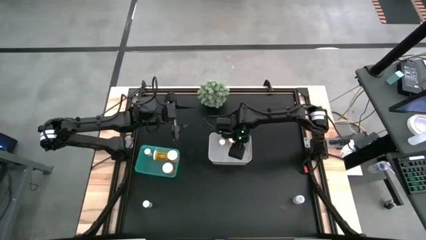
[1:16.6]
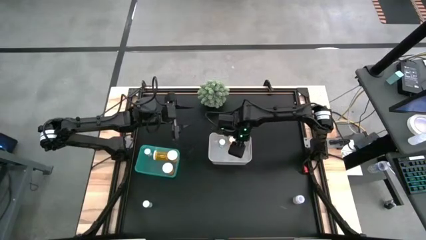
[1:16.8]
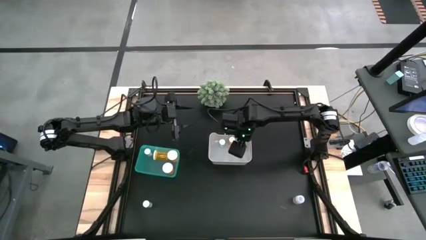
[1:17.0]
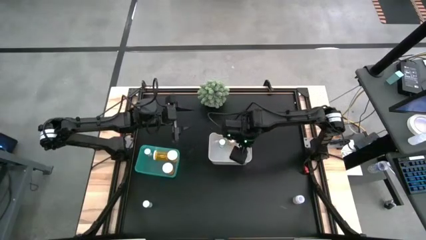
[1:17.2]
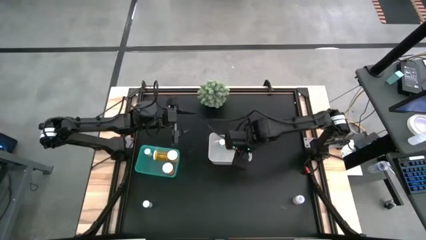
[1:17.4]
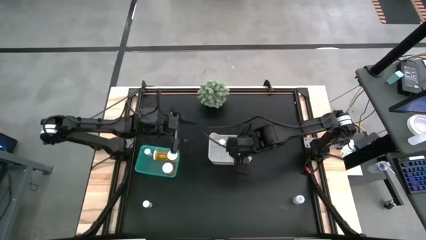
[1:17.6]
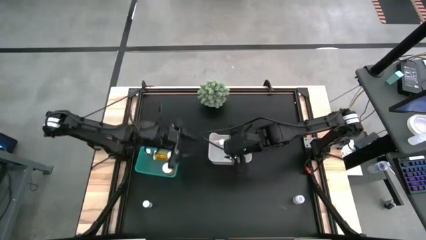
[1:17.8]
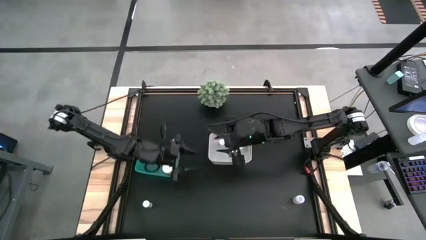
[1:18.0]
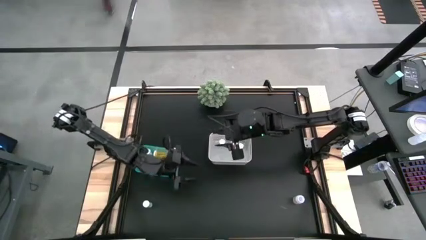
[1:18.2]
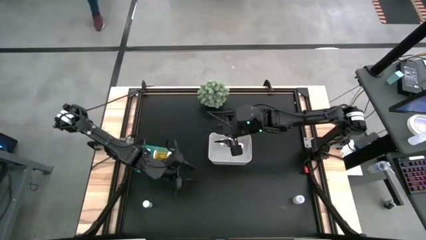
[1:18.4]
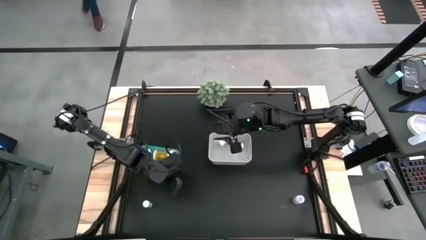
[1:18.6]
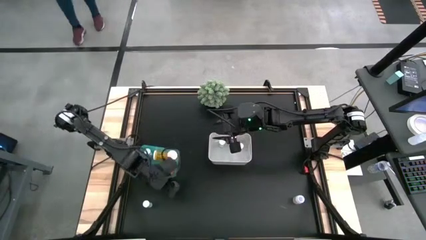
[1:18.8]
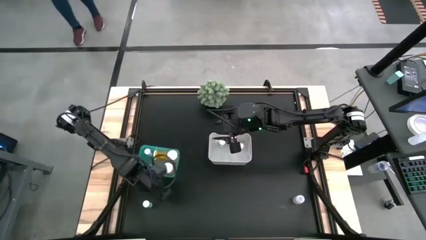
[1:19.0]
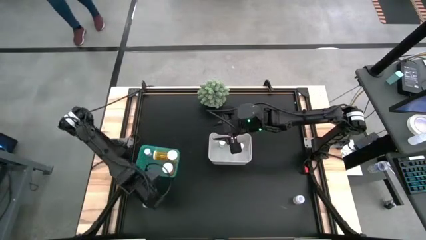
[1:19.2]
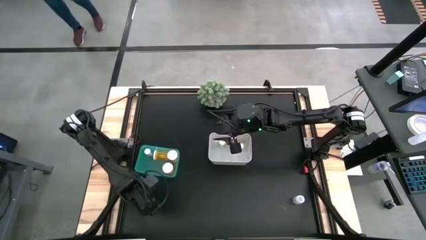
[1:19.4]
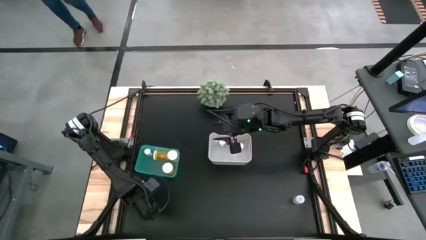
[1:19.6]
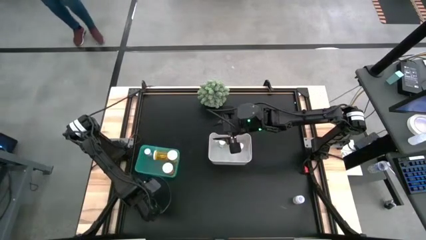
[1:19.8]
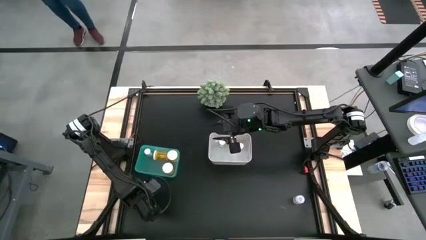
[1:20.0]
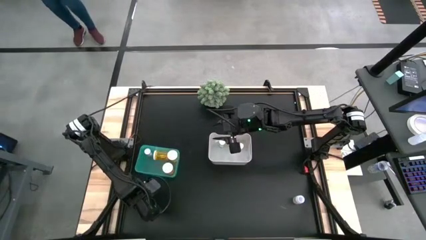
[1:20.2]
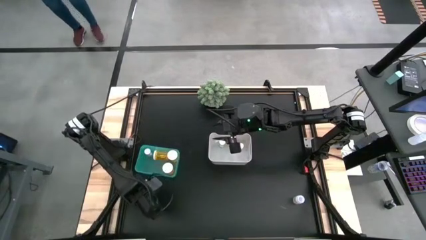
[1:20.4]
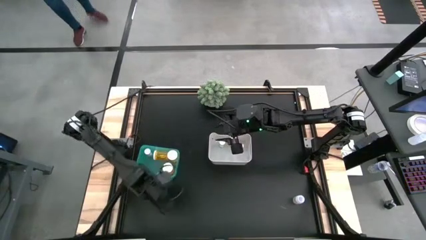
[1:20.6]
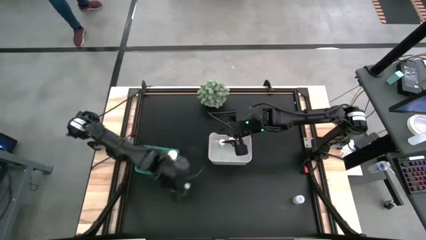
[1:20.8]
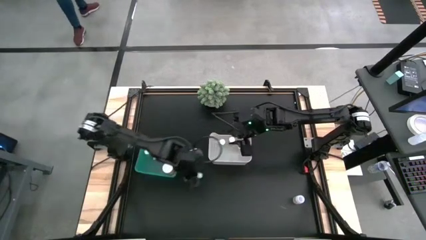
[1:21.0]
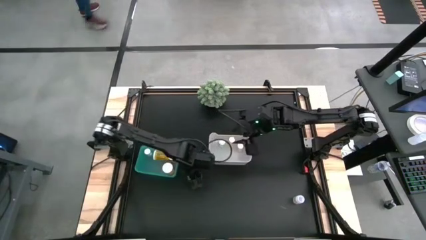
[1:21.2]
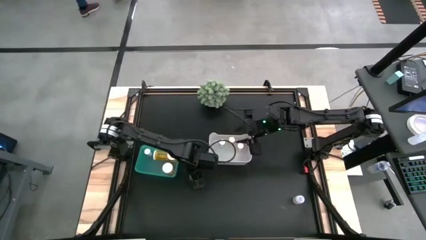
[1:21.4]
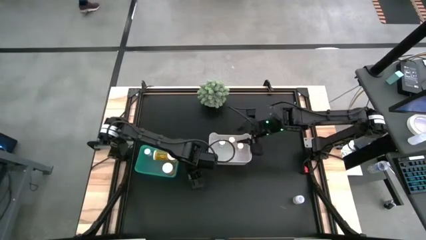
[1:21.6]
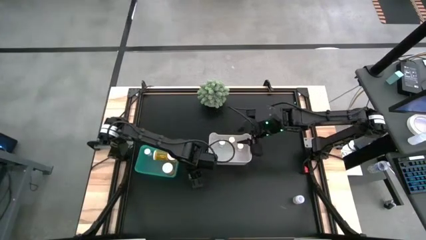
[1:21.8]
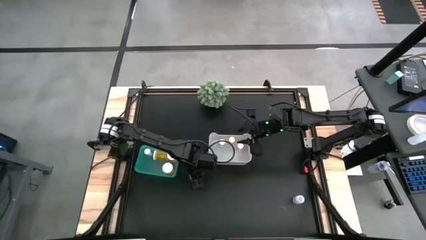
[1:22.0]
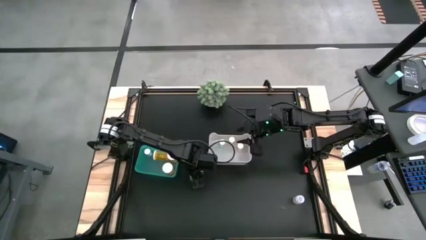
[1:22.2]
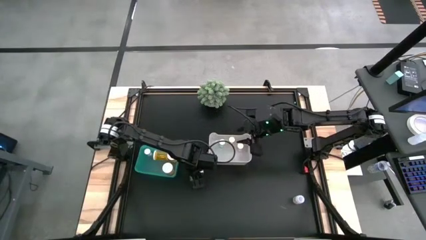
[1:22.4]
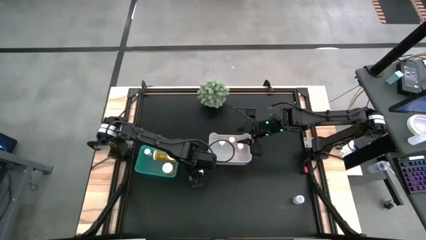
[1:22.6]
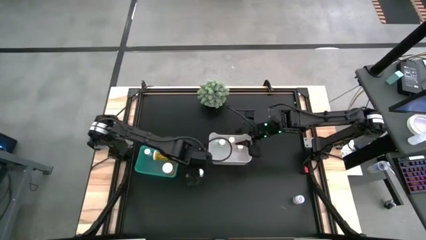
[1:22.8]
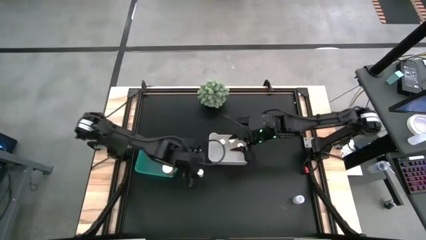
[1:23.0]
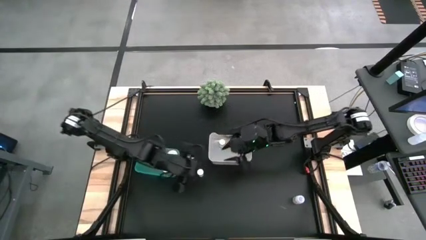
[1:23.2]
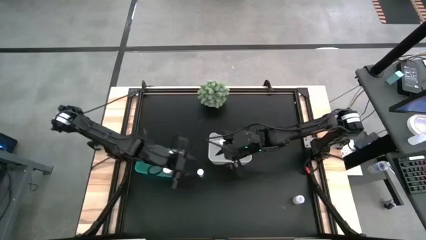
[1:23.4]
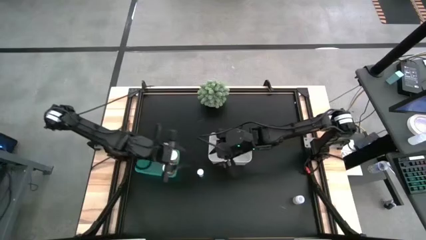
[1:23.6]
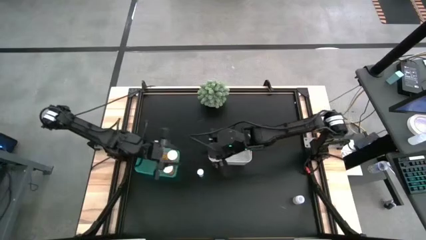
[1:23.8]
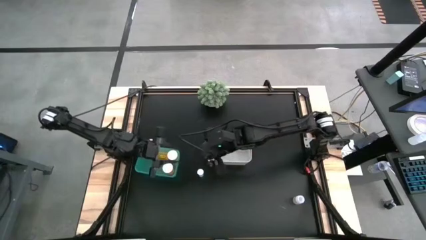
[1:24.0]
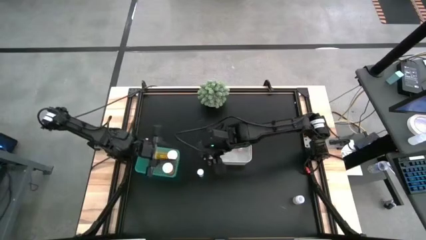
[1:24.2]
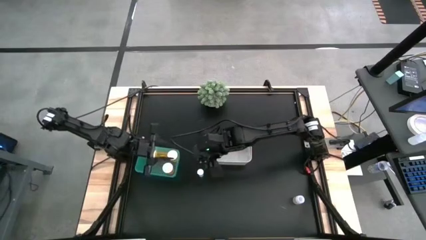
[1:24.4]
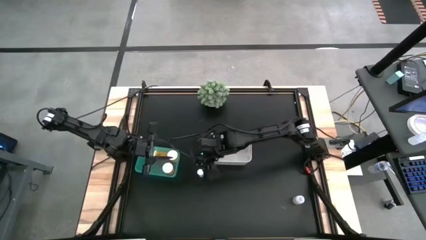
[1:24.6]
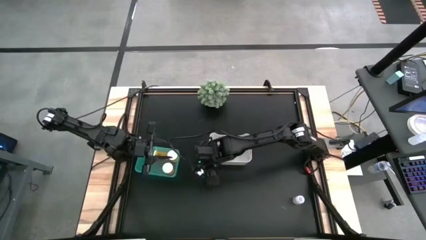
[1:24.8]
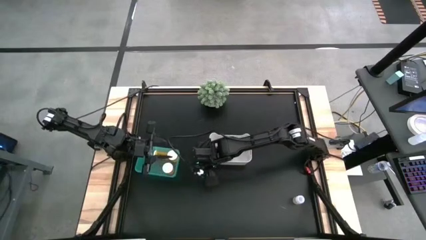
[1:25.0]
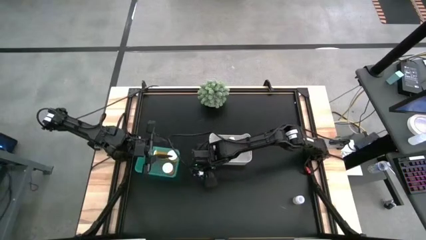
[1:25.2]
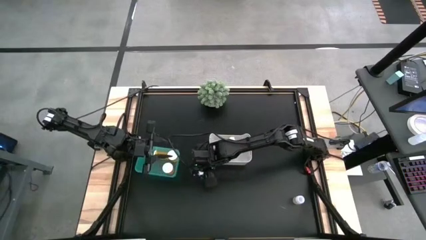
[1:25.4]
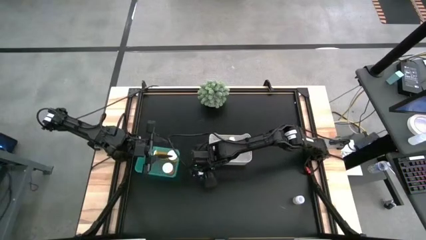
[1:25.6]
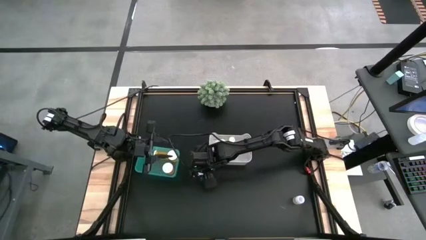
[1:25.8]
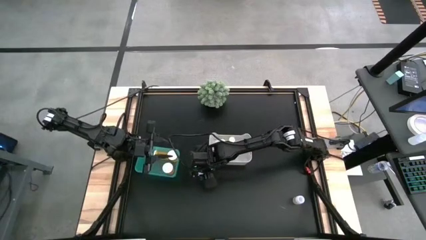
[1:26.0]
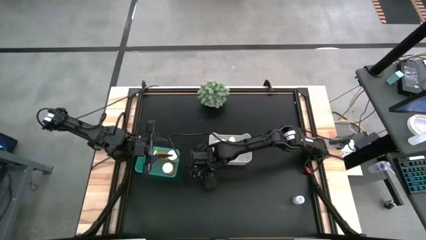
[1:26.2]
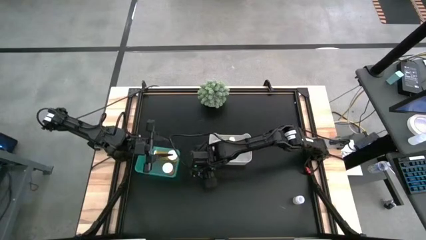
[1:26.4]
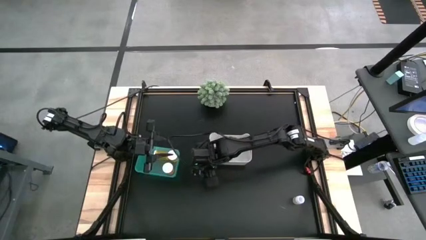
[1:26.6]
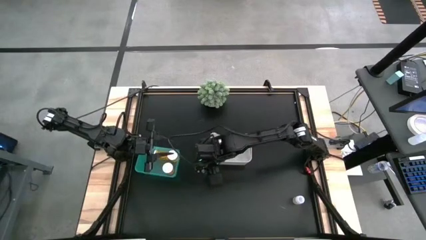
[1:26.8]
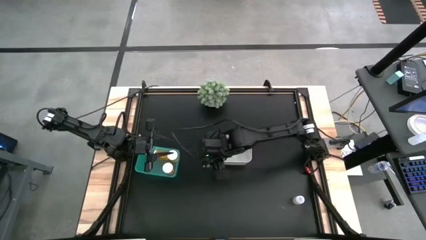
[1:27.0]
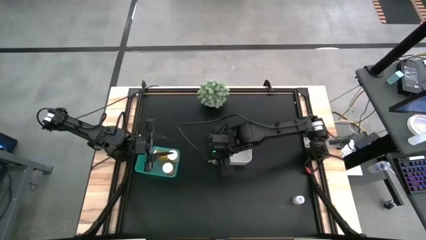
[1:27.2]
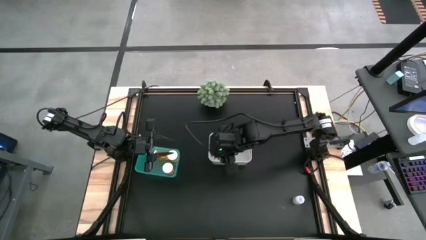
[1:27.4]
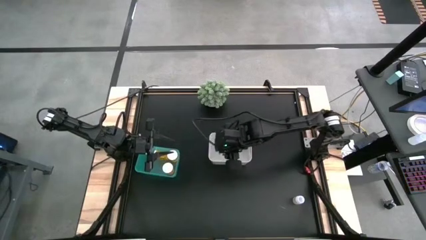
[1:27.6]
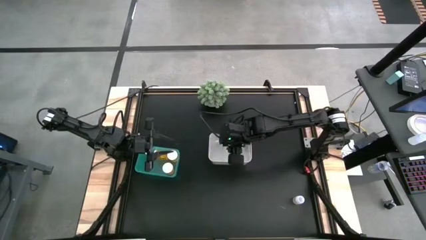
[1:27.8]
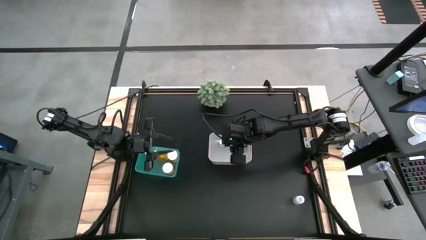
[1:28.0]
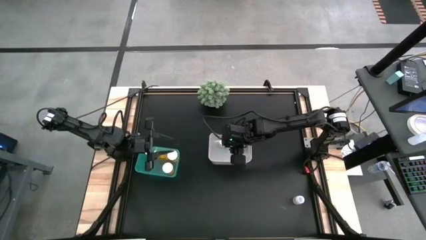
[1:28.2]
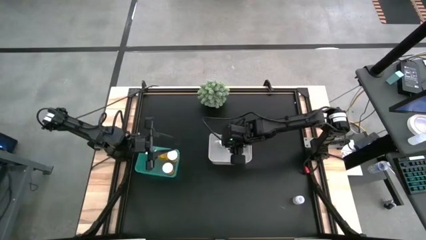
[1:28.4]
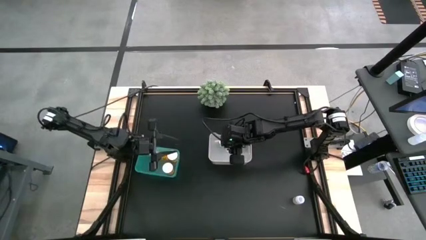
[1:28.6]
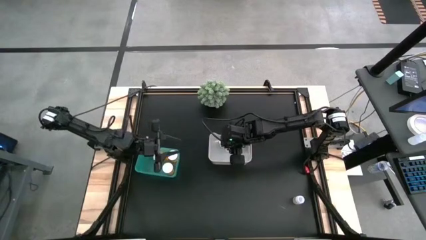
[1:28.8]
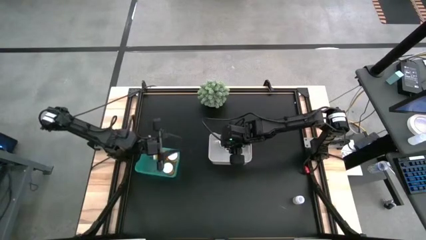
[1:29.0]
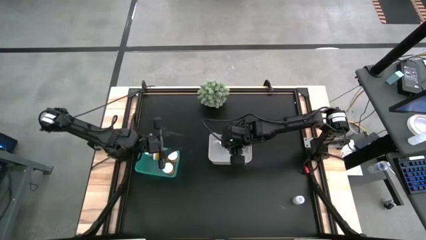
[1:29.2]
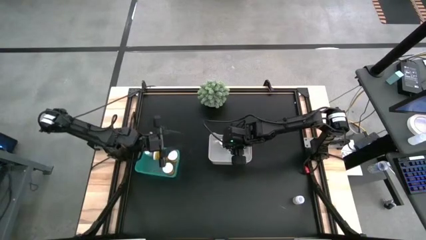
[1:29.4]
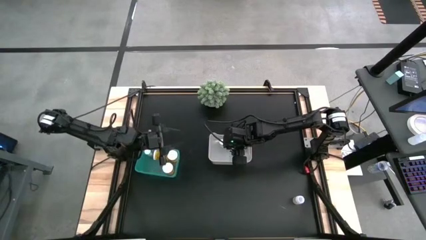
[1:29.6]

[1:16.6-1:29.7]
Task: Pick and place medicine bottles into bin by pill shape (circle, oval)
Put the blue tablet bottle into the white bin

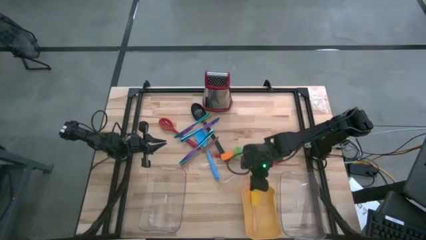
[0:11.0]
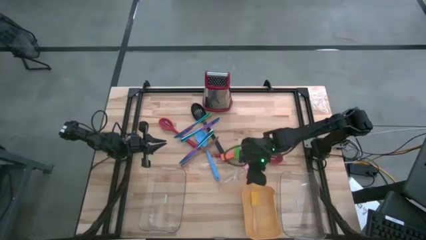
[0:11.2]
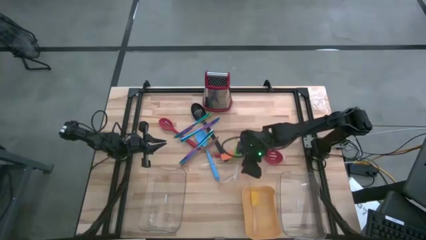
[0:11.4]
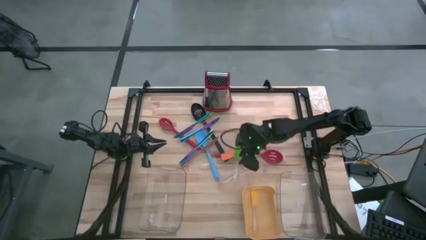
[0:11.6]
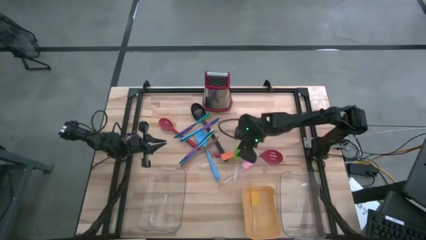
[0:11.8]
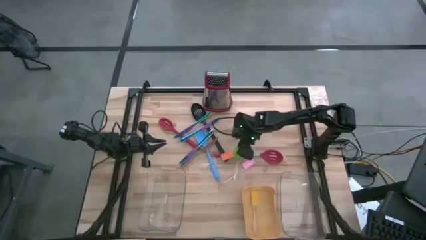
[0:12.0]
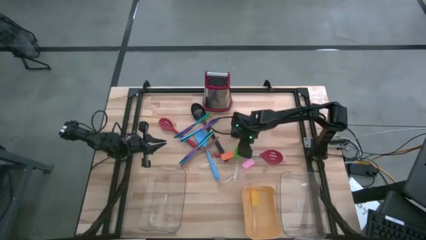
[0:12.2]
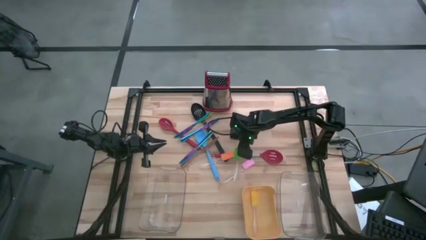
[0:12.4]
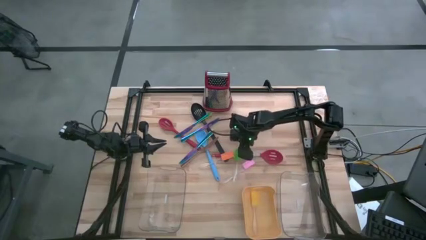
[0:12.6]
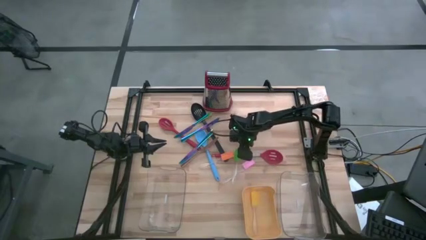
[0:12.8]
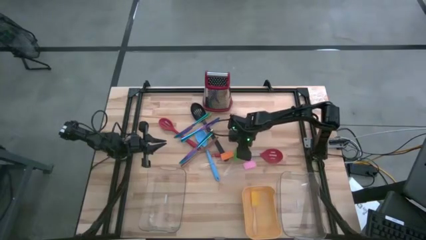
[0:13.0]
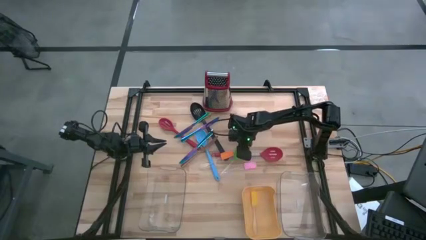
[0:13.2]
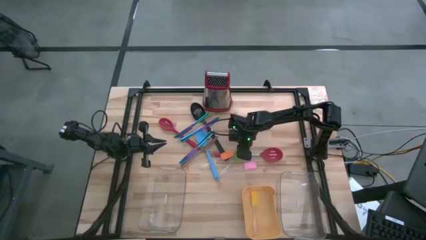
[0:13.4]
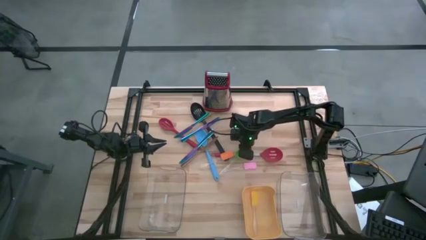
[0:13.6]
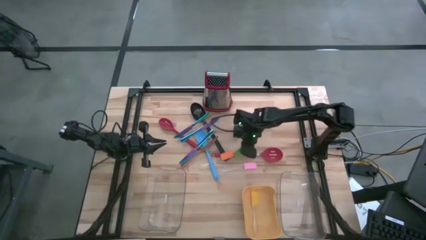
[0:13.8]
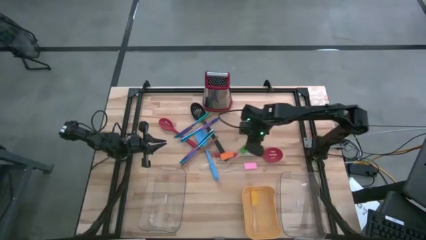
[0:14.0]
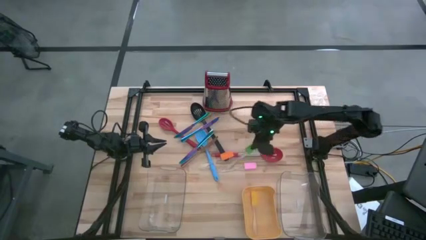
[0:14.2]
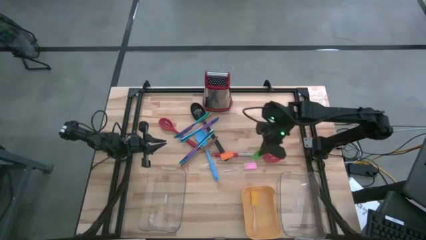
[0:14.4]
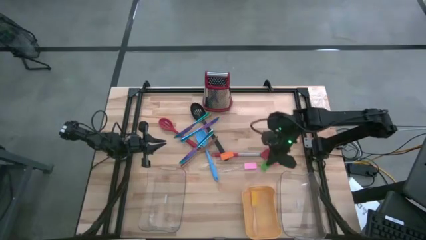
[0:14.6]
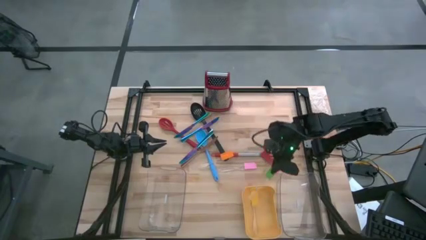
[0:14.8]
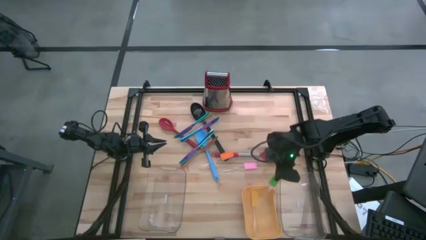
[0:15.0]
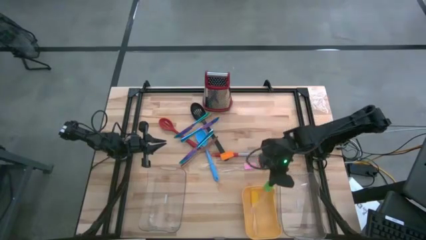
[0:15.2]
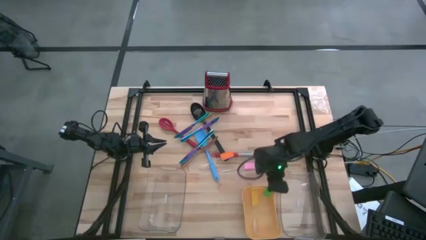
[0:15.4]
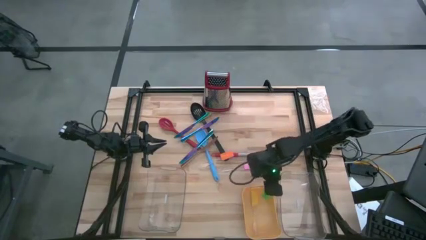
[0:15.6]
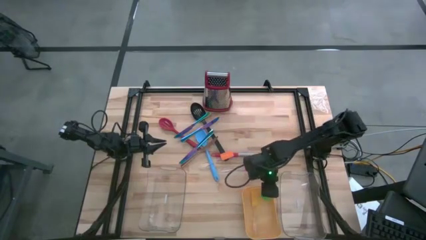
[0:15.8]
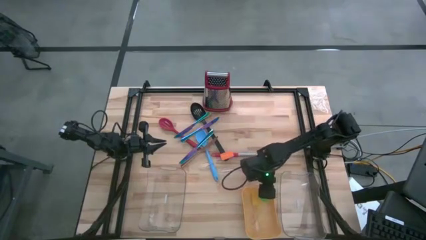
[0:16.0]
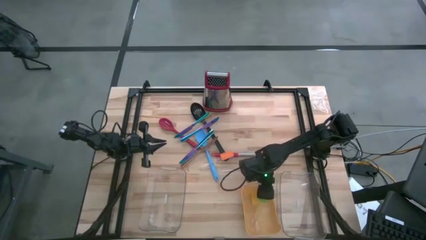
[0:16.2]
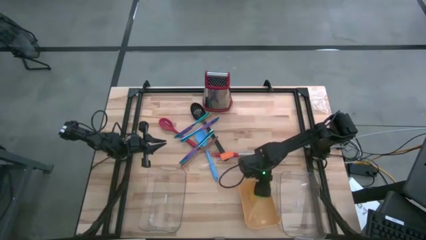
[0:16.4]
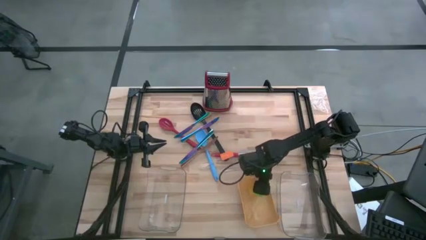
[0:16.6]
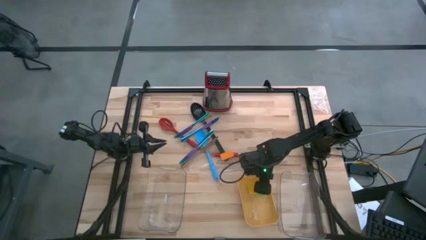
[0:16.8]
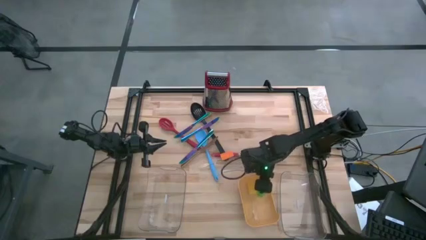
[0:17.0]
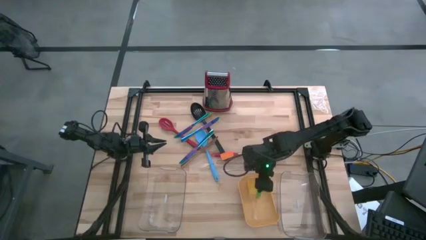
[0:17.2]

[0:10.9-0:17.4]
Task: Pick & Place Kitchen Items
Put the green spatula into the yellow bin
